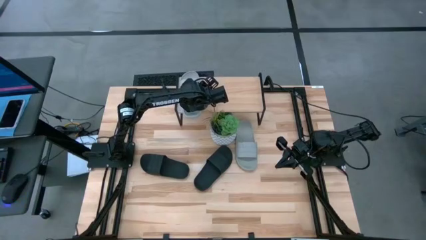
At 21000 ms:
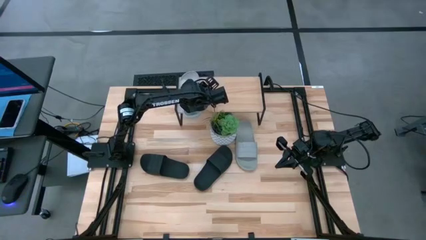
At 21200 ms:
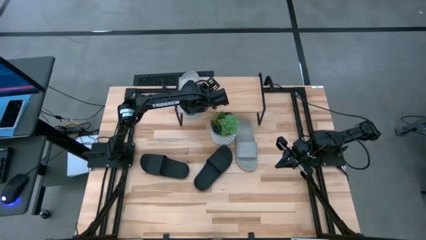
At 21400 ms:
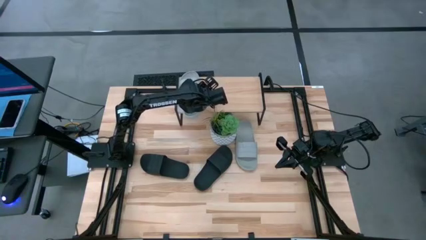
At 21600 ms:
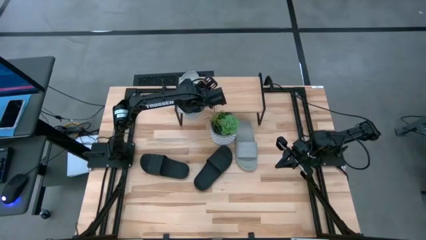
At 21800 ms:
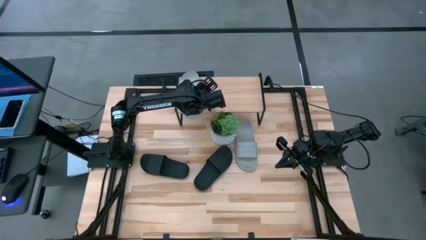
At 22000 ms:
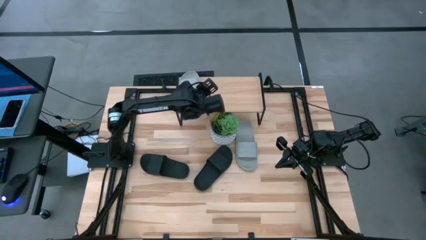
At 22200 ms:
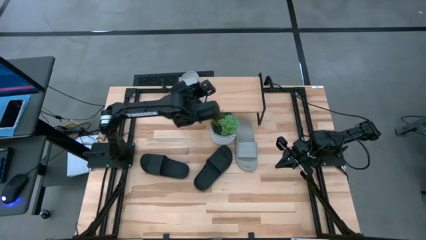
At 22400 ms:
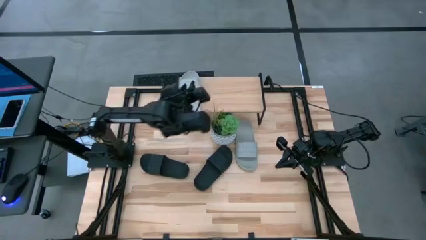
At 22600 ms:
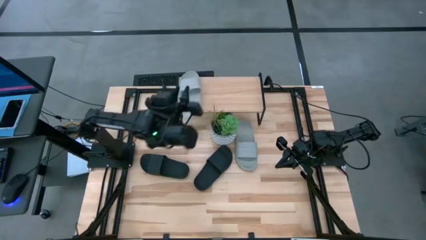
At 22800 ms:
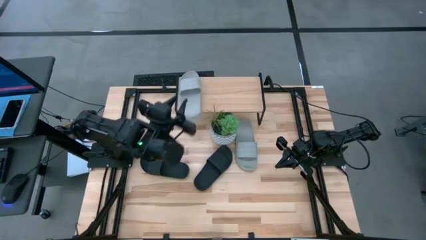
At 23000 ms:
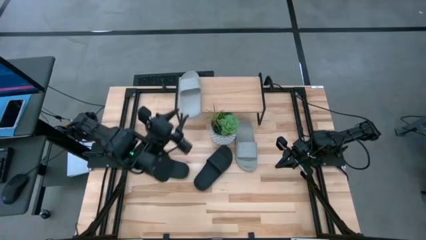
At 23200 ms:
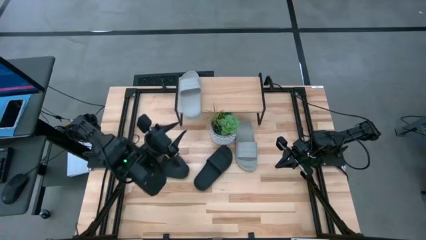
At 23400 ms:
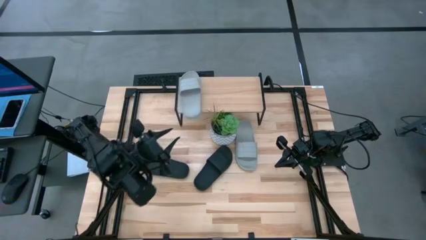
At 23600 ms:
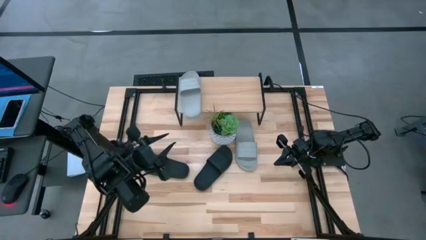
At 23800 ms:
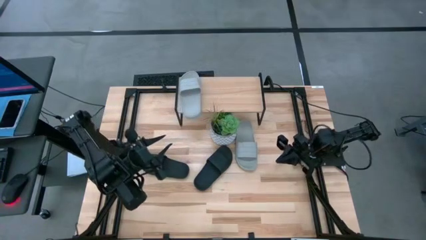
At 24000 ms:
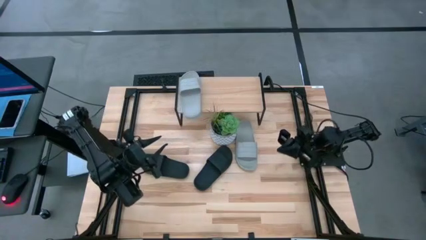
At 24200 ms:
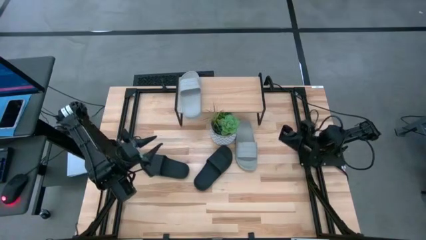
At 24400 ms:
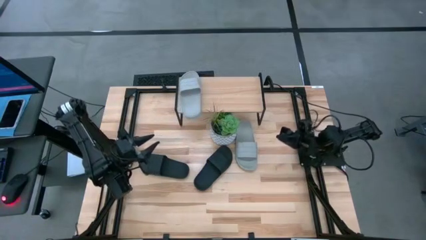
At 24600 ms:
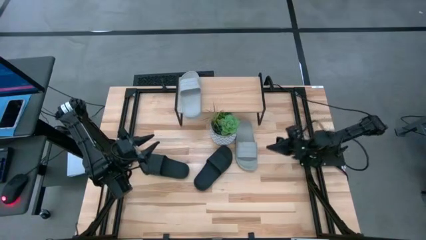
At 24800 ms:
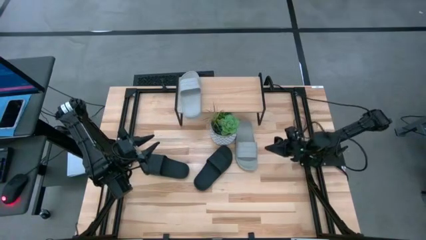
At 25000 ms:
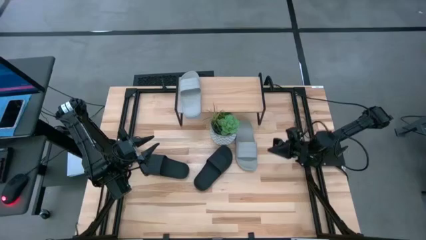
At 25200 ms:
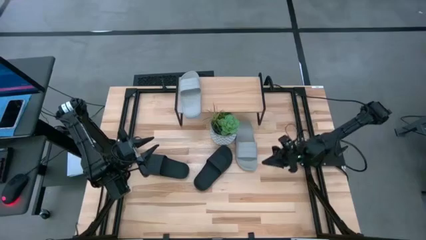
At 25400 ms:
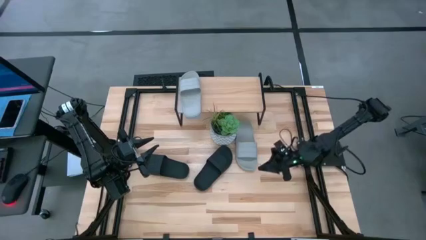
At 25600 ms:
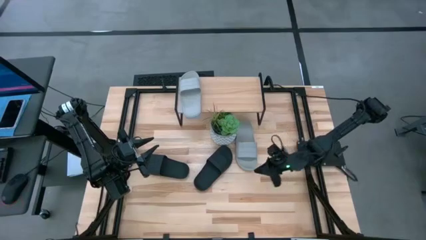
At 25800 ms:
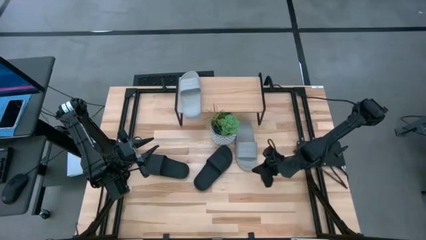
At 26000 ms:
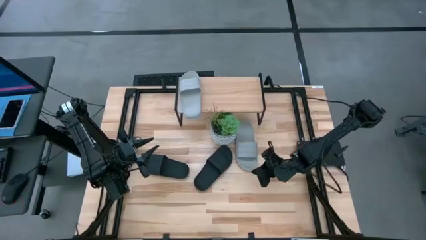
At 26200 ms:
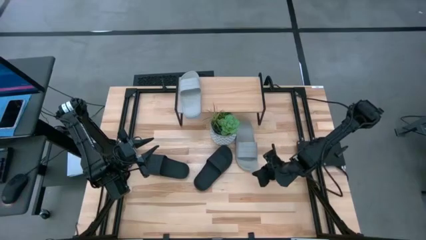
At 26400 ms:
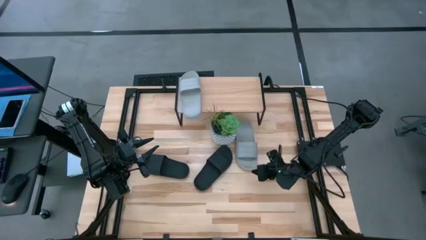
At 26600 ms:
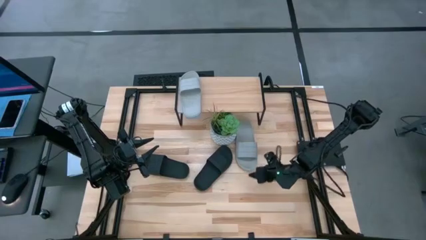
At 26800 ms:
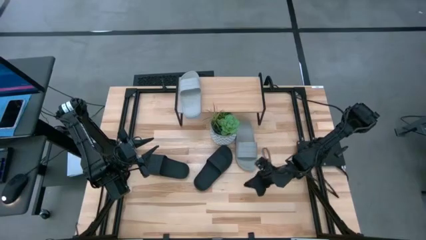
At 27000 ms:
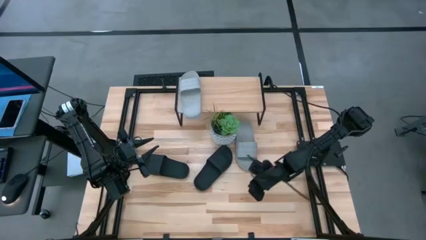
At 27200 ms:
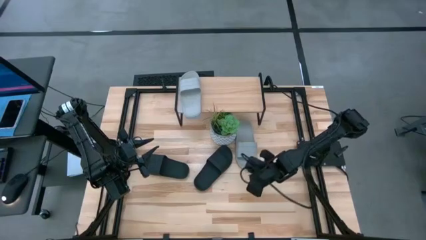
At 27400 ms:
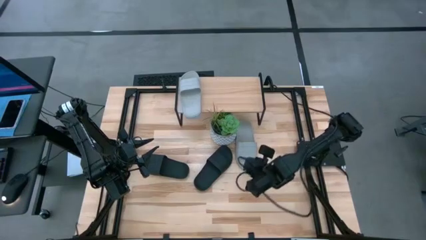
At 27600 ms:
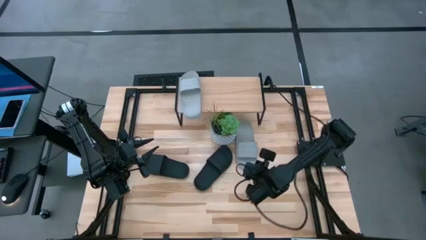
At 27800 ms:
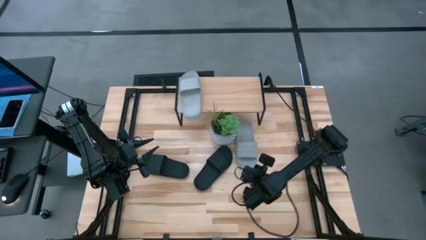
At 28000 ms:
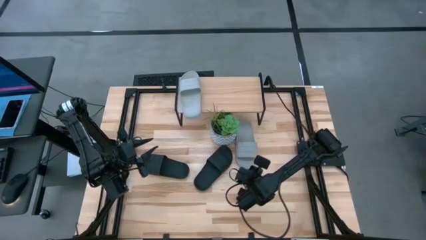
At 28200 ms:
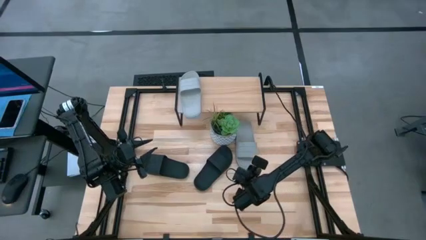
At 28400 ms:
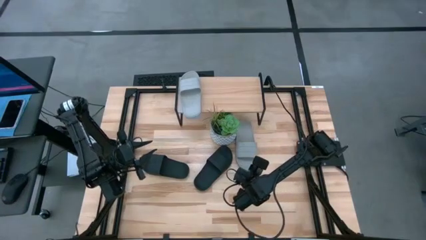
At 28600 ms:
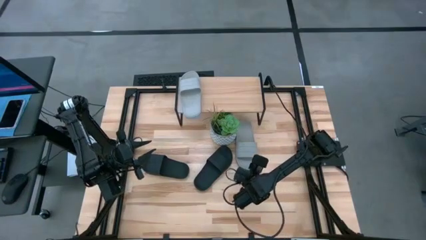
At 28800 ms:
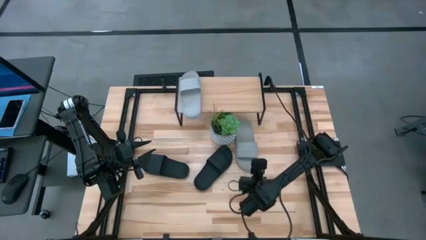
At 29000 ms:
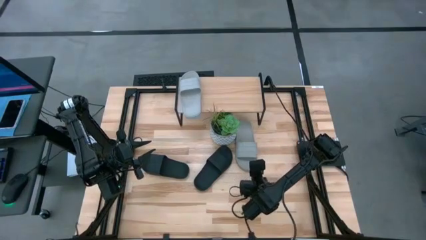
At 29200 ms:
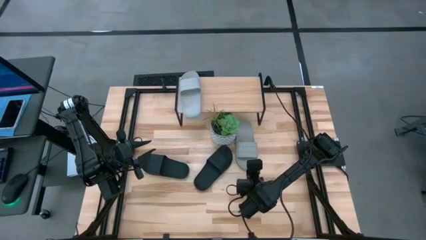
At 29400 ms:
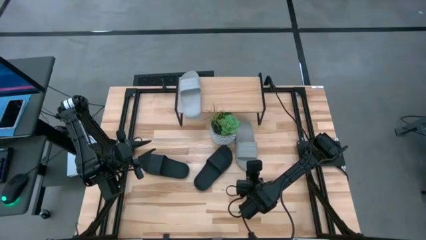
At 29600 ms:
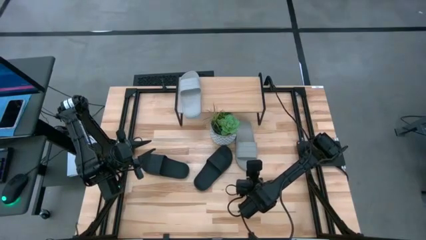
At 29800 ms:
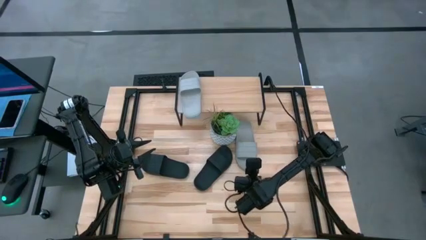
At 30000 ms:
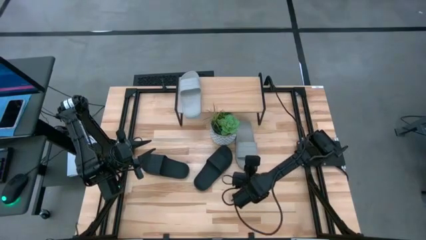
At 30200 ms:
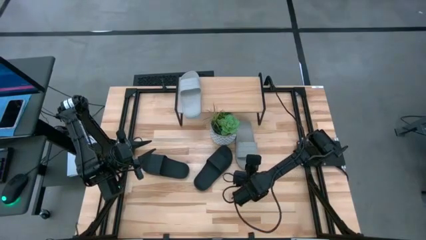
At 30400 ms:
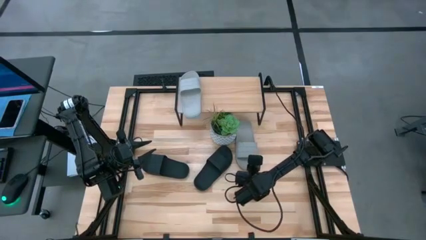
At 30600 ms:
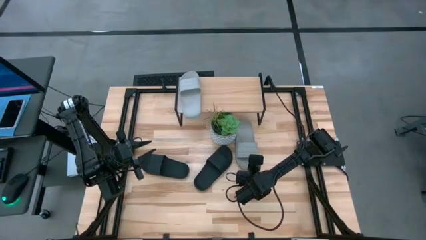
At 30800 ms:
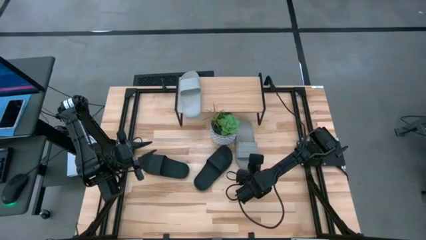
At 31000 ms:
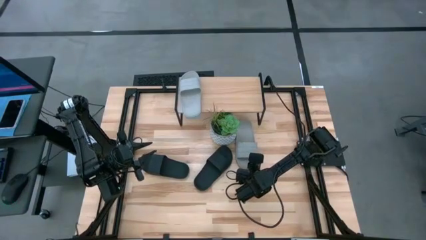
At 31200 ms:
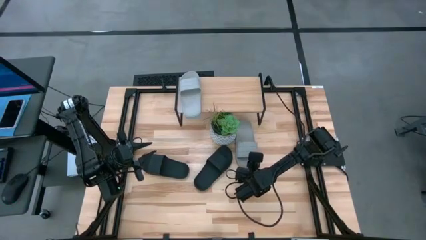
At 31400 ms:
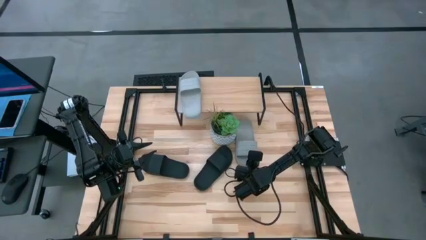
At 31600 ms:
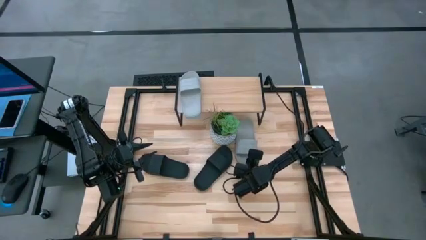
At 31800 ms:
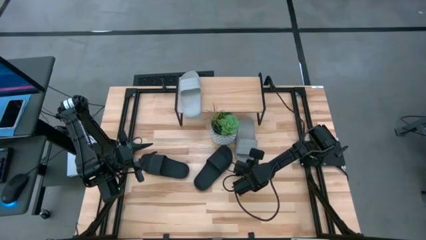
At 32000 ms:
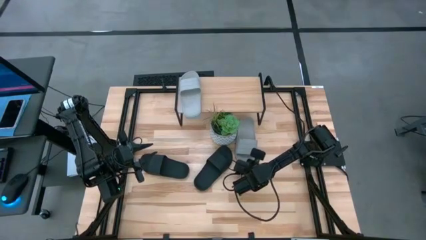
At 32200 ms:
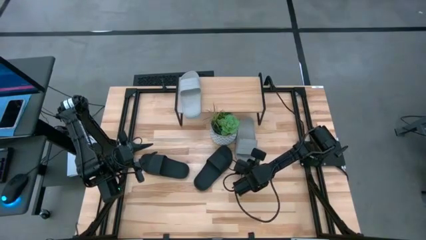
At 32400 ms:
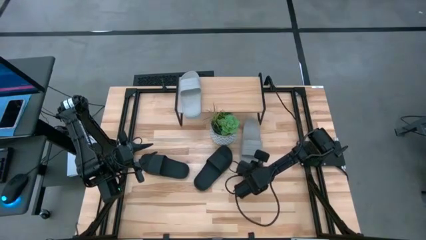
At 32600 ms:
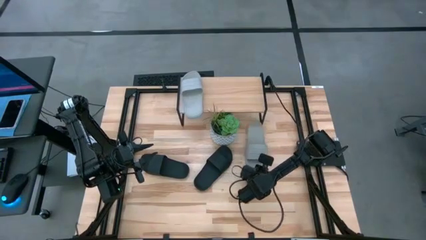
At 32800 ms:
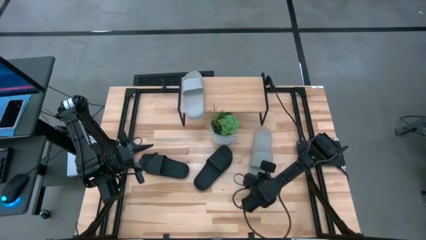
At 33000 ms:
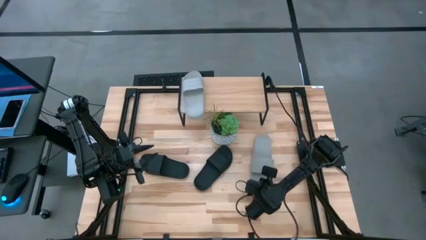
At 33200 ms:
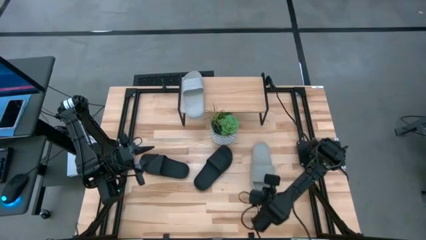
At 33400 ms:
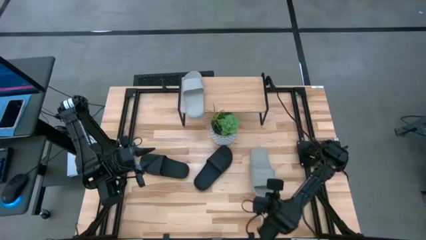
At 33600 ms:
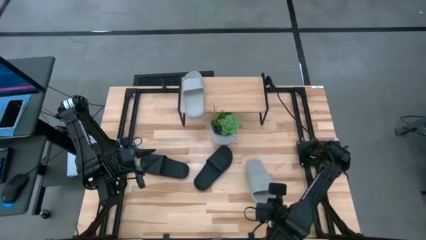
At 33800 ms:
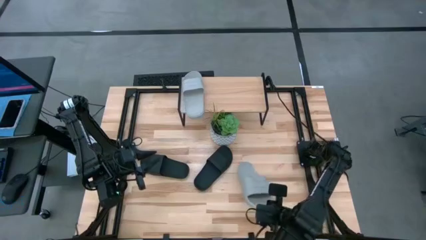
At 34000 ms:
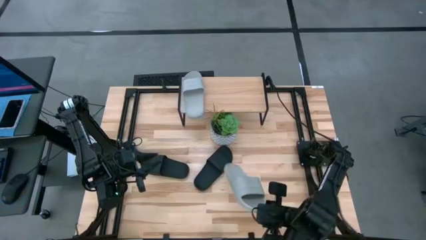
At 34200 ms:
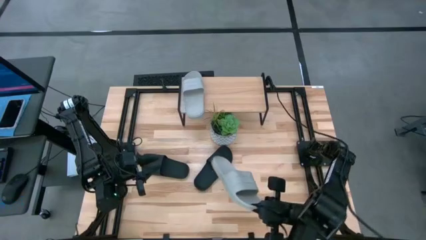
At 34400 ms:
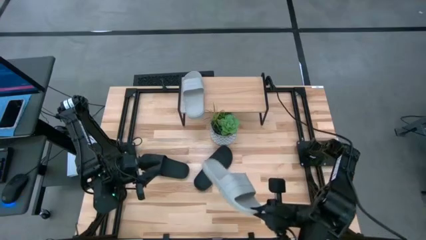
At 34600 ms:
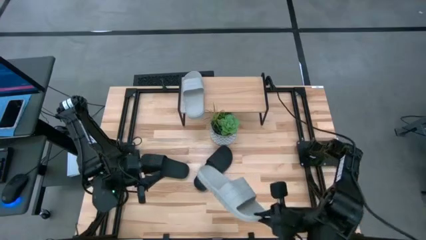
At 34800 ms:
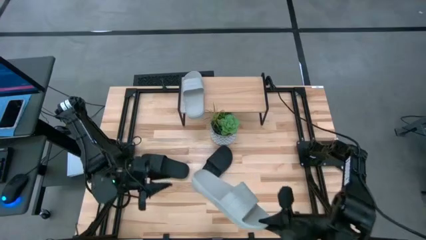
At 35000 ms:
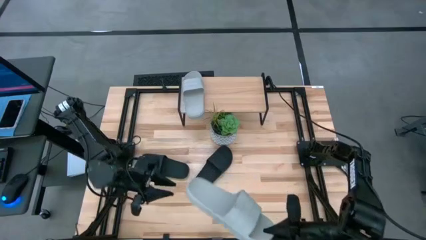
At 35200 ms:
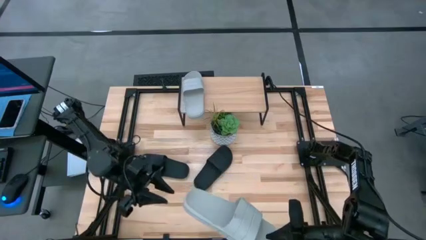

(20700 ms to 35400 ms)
Task: Pick and place slides into the shelf
Put the gray slide on the shelf
